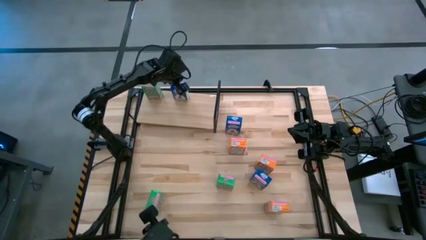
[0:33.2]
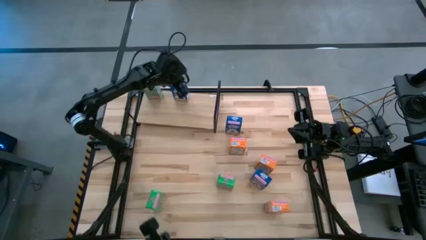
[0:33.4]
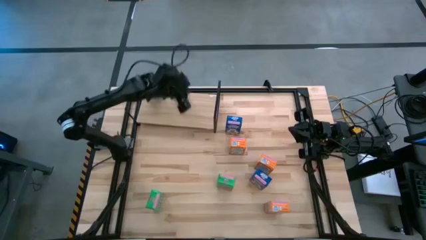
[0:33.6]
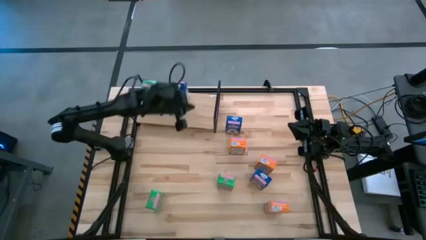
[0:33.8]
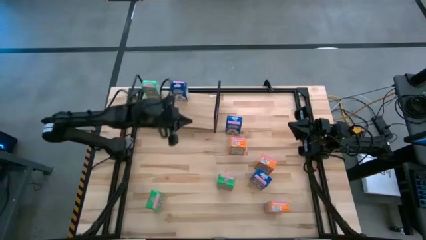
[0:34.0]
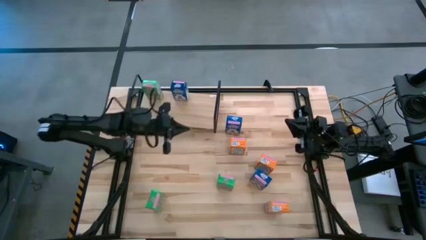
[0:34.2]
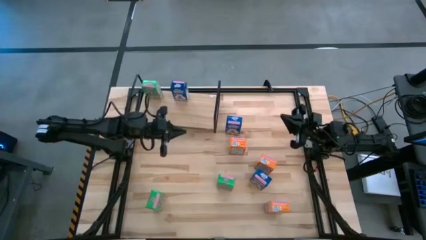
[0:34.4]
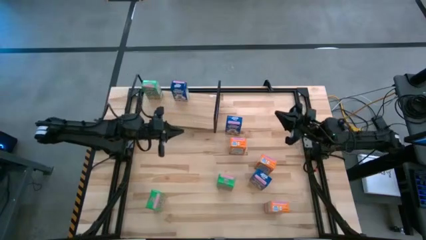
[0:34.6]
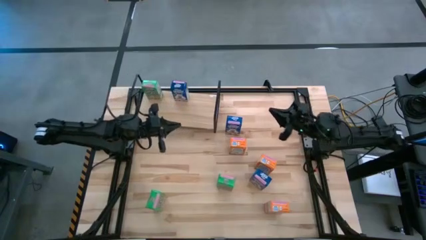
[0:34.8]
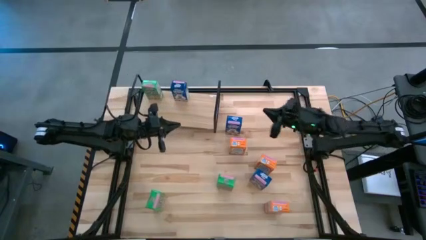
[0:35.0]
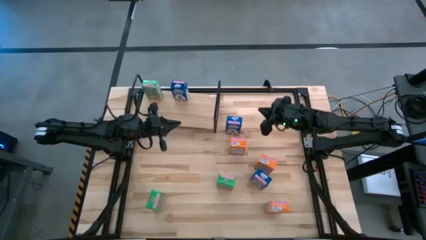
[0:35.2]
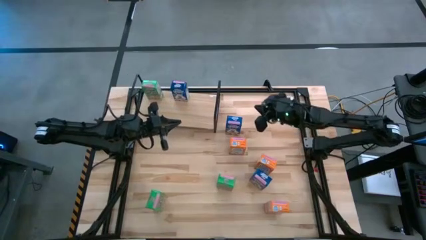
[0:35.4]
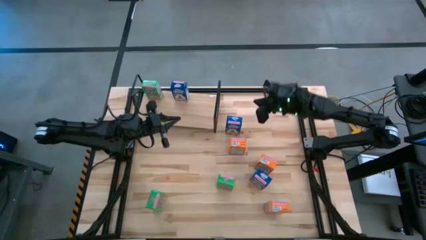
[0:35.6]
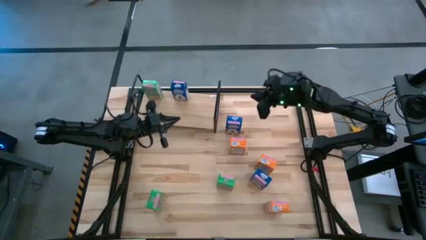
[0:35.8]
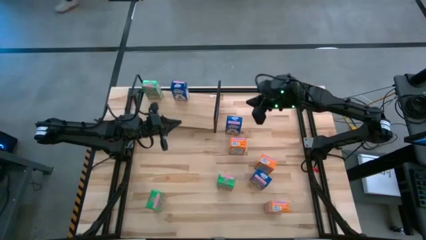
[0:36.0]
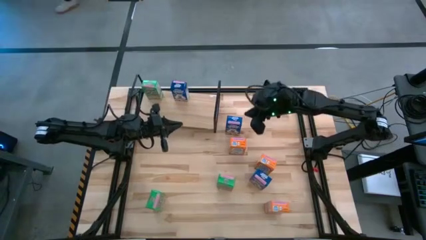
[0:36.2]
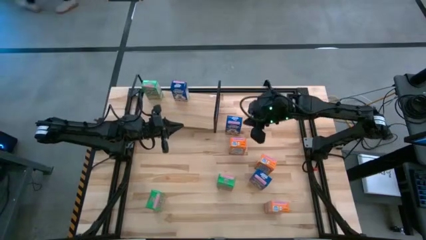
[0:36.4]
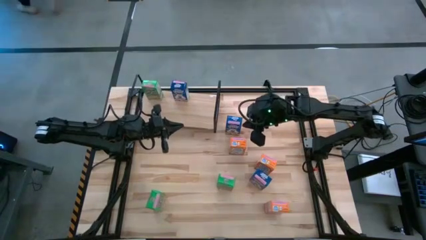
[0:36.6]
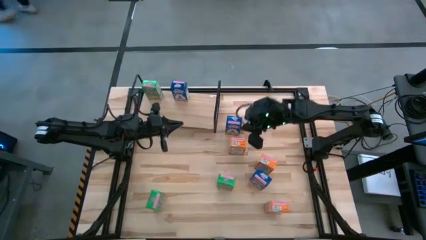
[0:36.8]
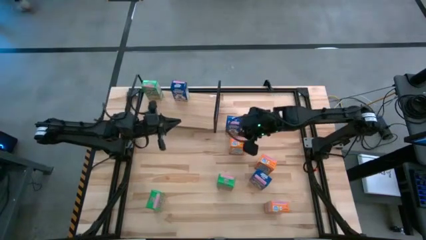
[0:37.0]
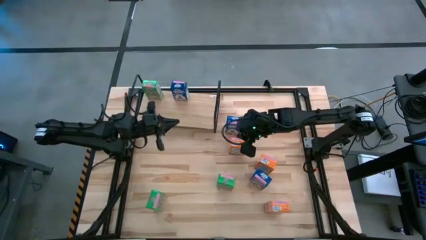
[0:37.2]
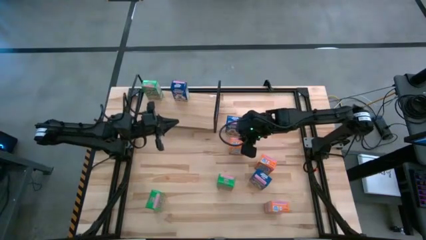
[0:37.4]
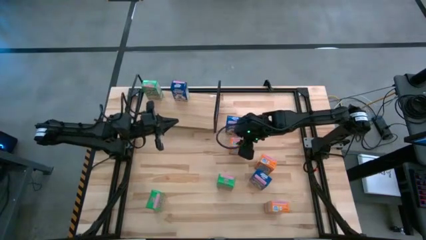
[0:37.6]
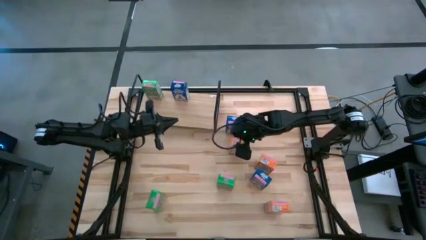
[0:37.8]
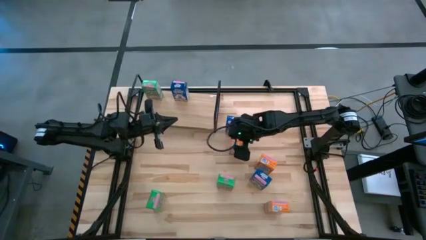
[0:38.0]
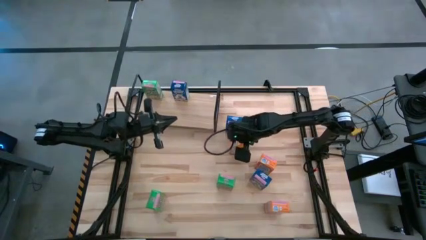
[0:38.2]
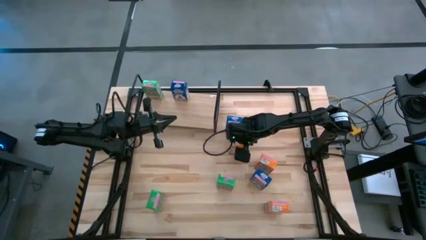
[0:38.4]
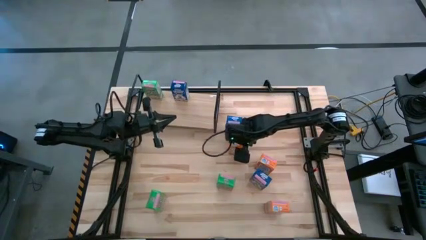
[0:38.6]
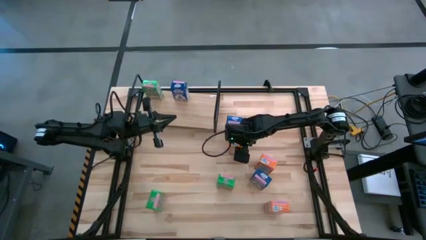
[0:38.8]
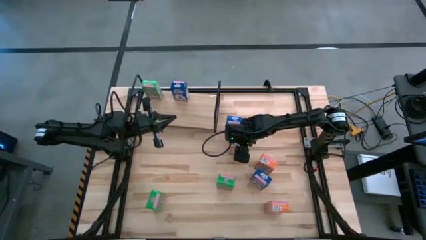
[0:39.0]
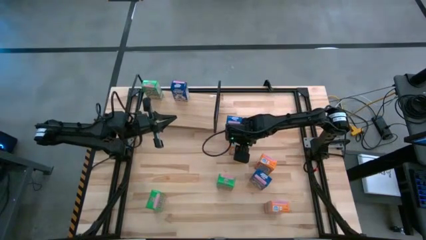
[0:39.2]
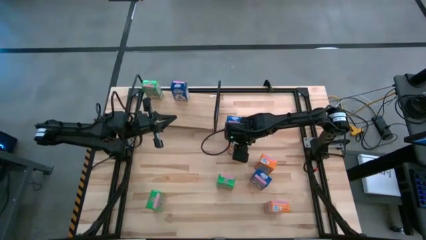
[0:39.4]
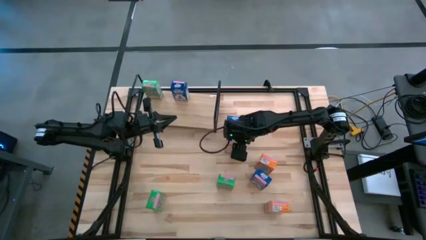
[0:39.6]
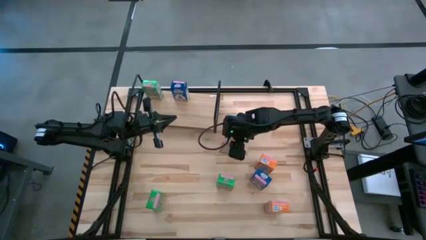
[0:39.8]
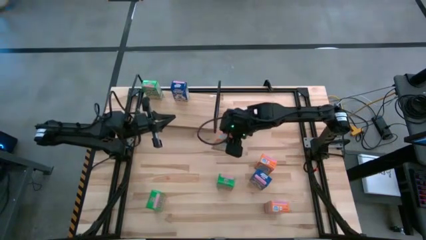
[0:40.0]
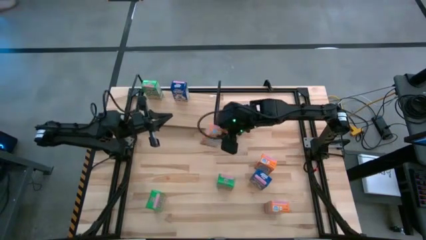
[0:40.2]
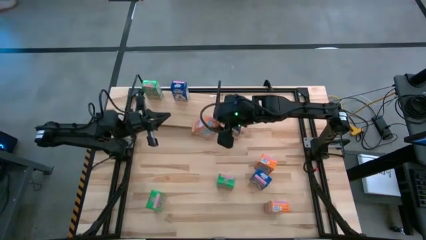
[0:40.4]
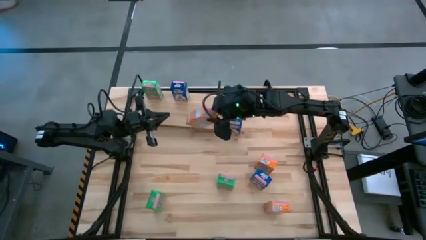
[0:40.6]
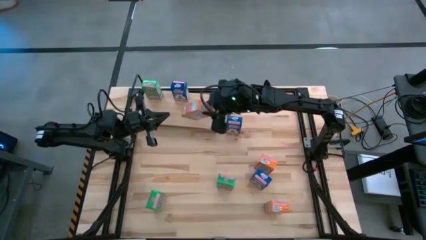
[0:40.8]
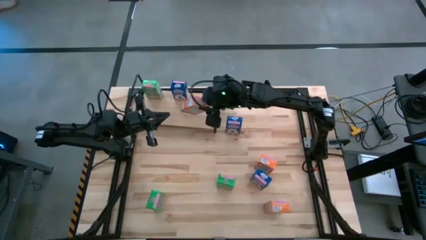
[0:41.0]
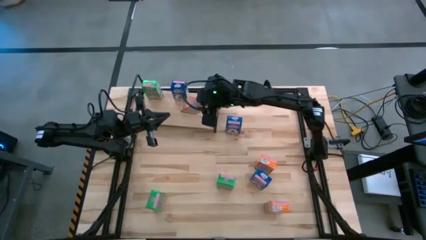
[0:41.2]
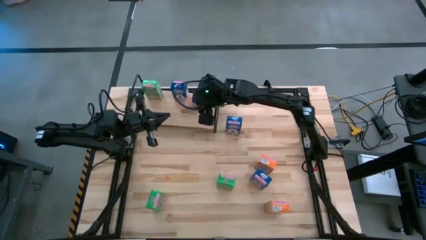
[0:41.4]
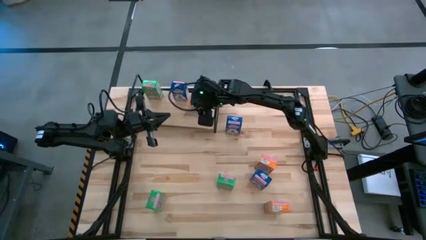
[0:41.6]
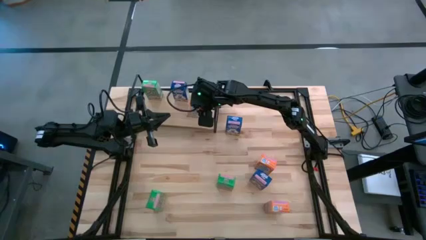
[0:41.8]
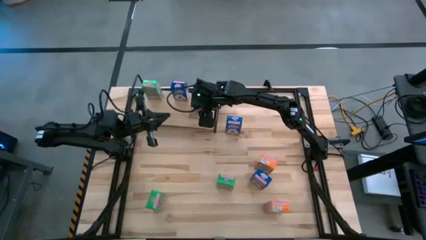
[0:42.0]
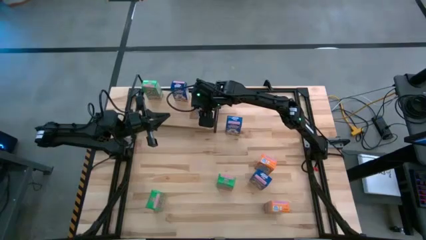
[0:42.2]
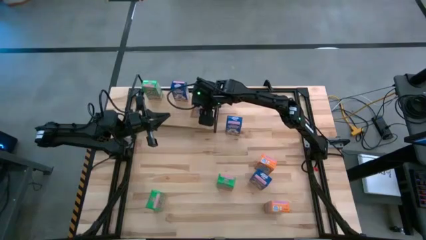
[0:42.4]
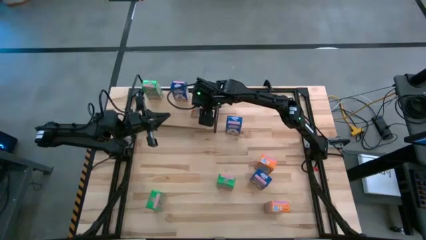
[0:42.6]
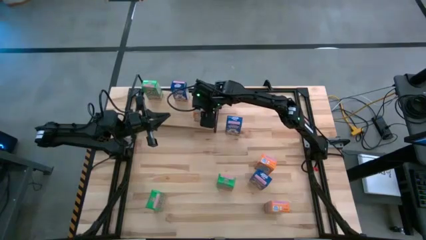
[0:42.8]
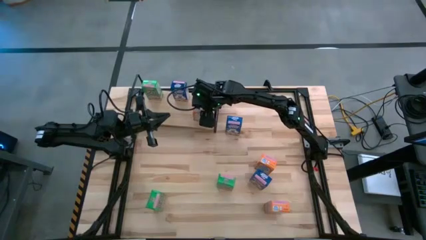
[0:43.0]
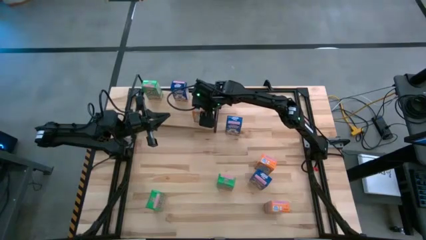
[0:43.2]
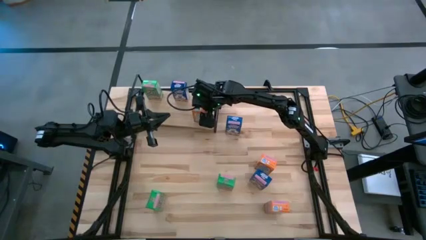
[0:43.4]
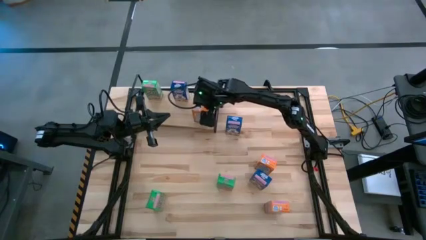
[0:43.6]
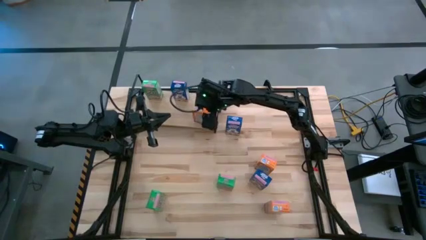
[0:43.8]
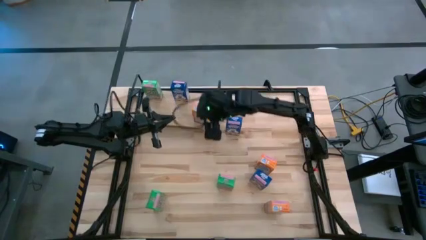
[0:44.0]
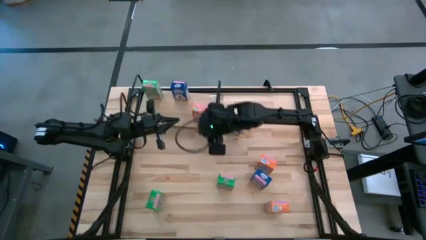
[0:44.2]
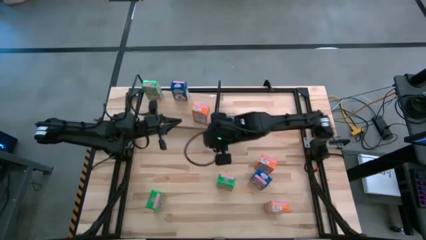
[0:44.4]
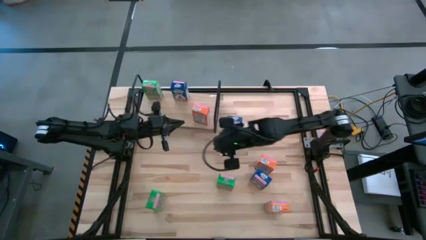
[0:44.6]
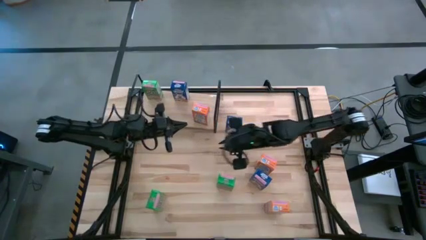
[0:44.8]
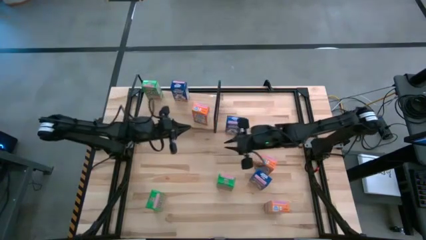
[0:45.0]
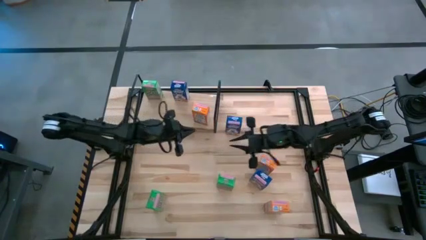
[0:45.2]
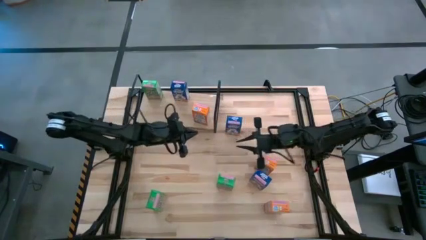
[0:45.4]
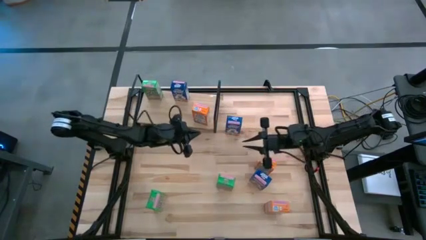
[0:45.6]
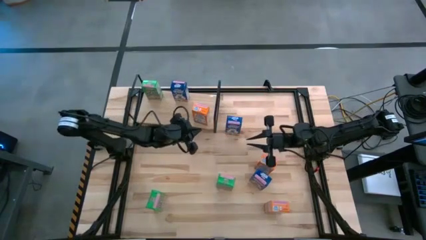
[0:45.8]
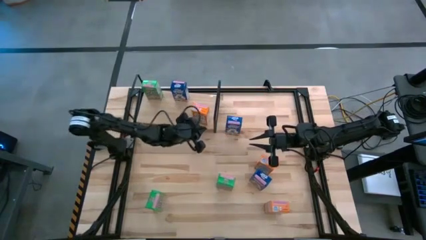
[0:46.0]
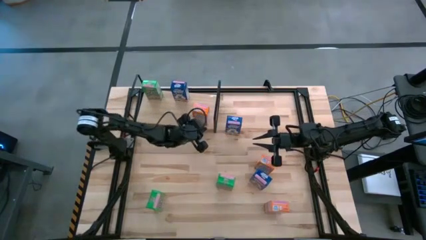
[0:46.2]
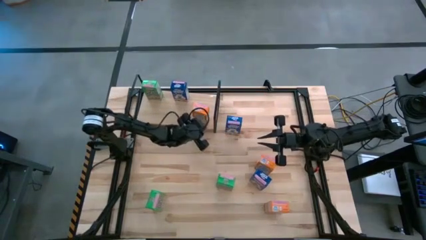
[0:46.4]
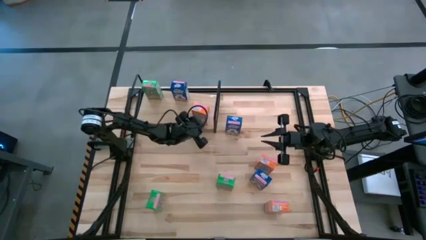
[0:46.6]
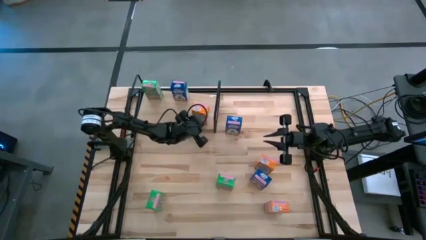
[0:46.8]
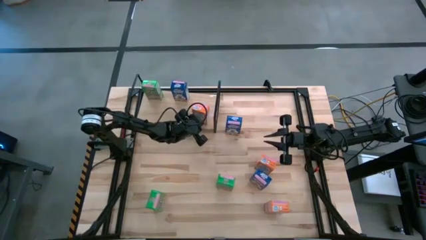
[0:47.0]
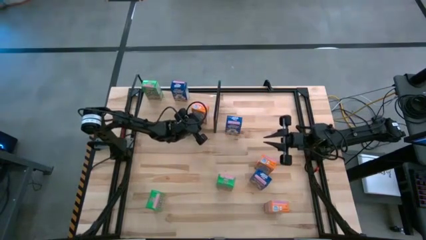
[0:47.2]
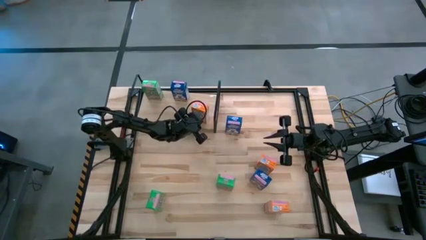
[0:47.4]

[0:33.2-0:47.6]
Task: Stack cereal on shelf
Put the top left orange cereal box on the shelf
